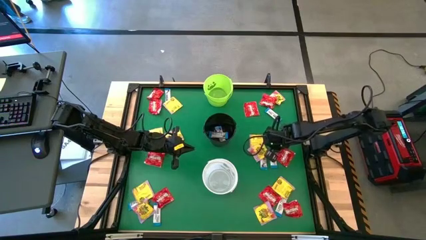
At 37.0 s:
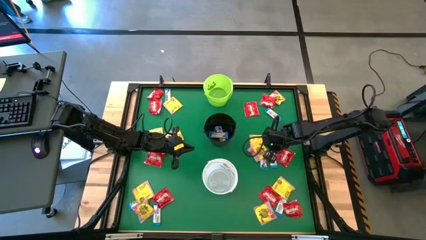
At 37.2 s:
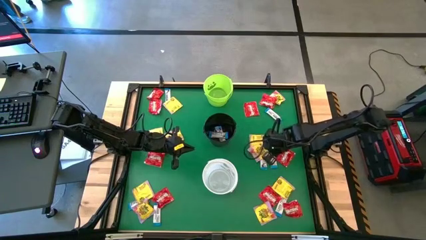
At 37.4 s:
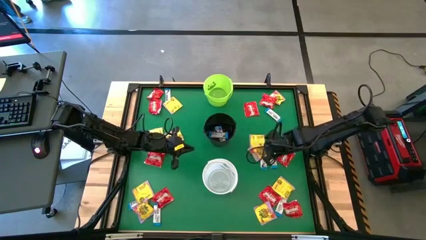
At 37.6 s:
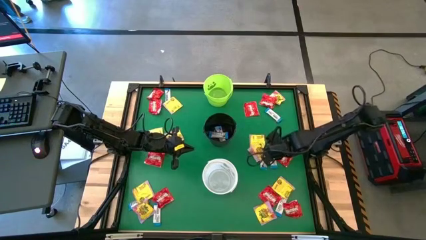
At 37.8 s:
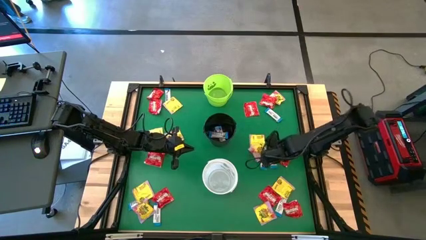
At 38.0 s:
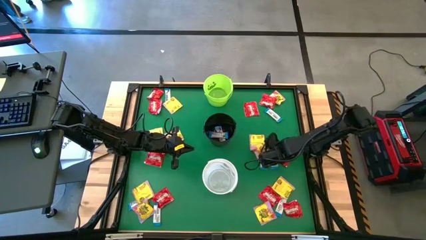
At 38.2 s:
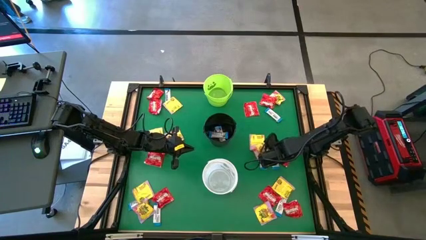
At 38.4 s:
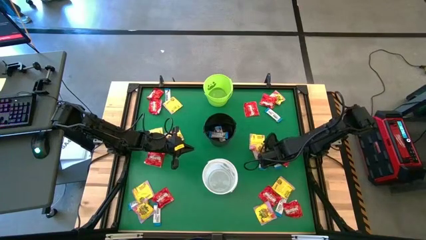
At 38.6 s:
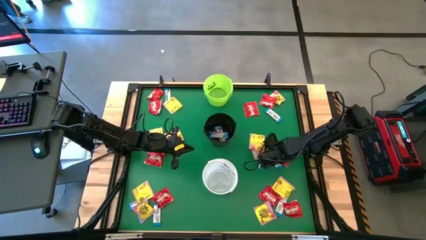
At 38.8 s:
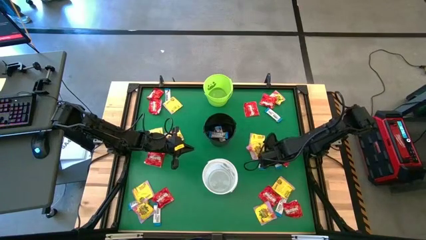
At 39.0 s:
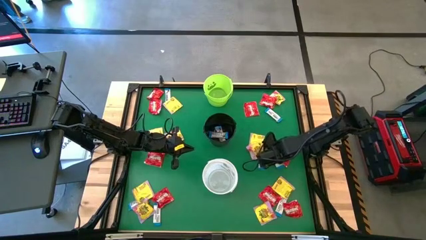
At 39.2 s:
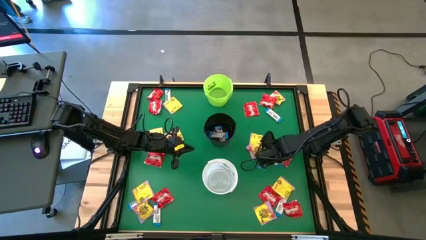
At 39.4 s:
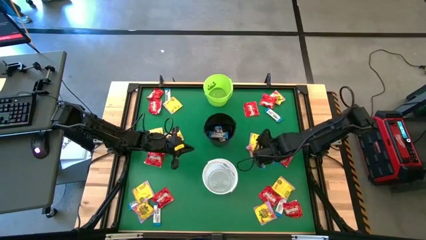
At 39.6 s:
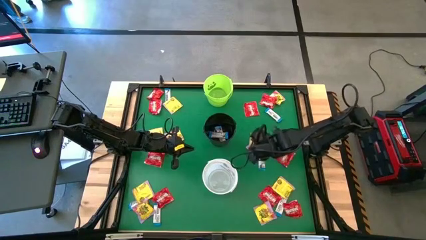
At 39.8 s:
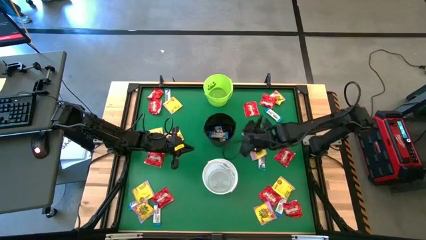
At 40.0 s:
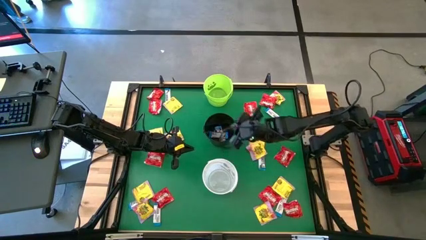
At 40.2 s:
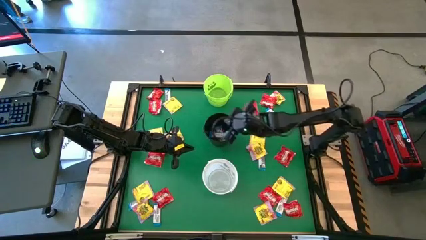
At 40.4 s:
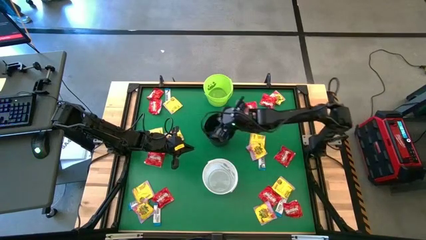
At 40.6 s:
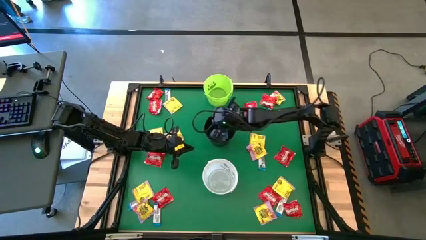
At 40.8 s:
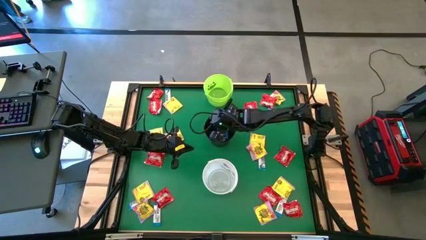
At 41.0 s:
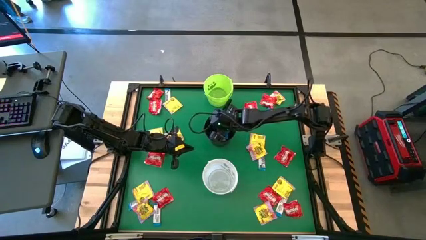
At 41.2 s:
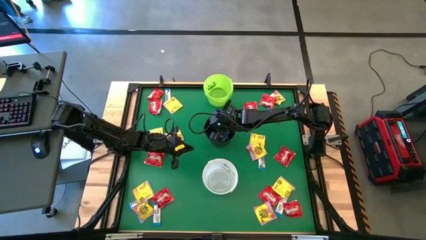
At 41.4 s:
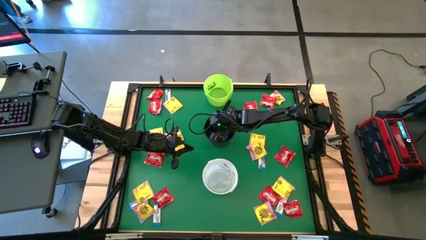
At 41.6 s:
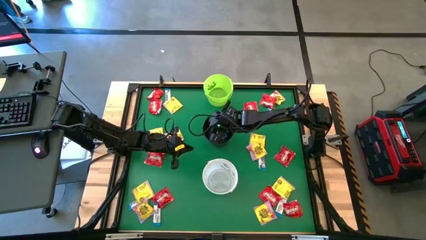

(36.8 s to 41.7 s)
Task: Sort candy by brand, put in halloween buckets
Put the white chocolate into the black bucket

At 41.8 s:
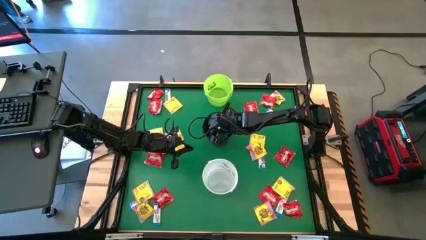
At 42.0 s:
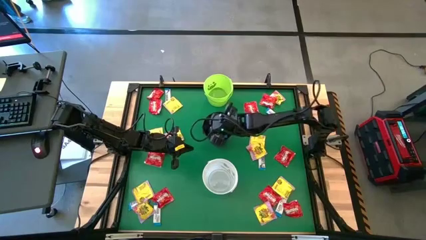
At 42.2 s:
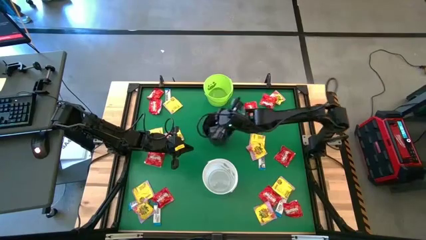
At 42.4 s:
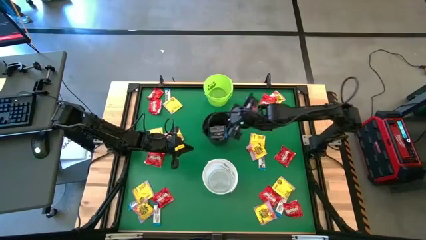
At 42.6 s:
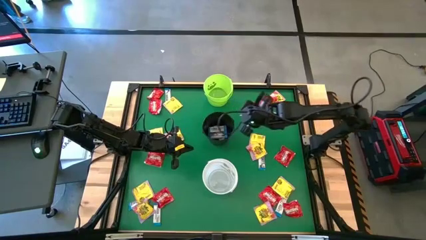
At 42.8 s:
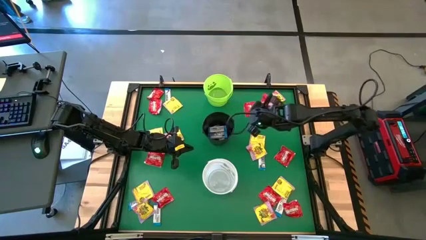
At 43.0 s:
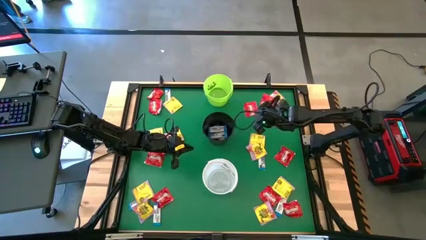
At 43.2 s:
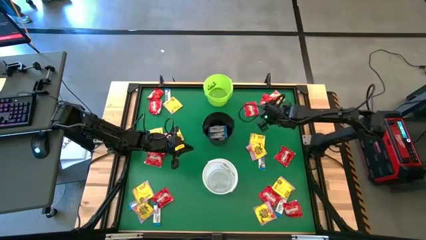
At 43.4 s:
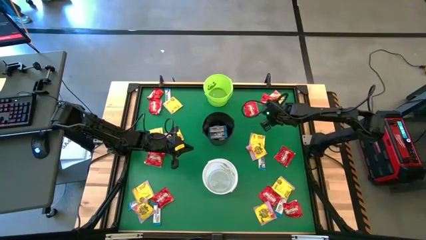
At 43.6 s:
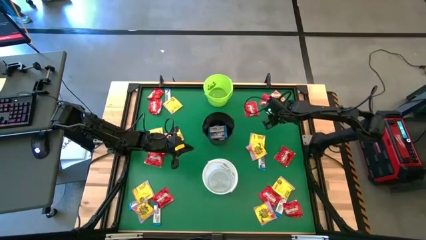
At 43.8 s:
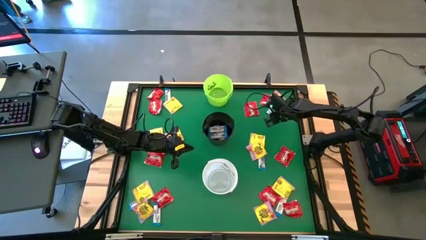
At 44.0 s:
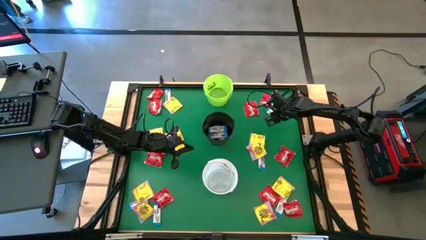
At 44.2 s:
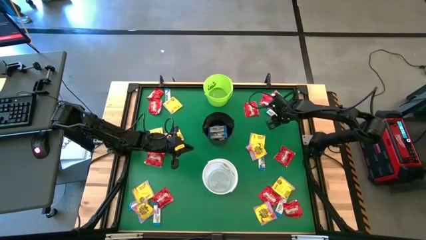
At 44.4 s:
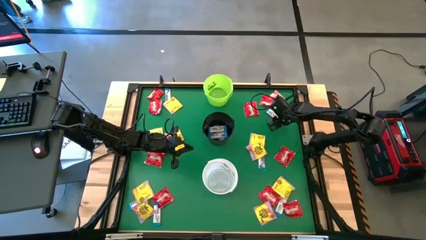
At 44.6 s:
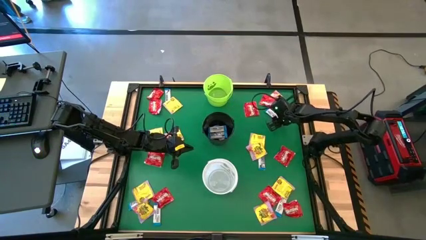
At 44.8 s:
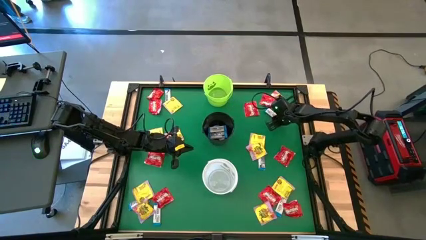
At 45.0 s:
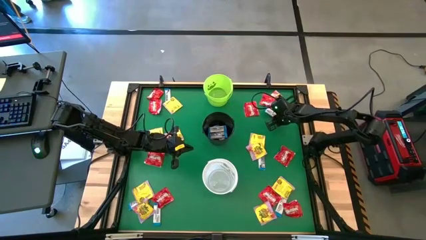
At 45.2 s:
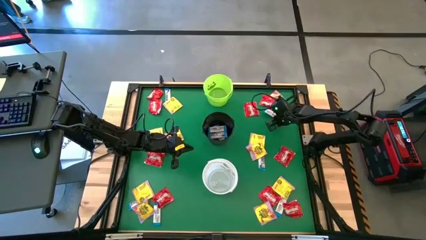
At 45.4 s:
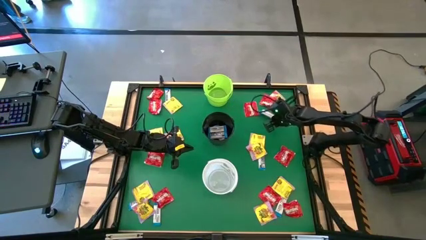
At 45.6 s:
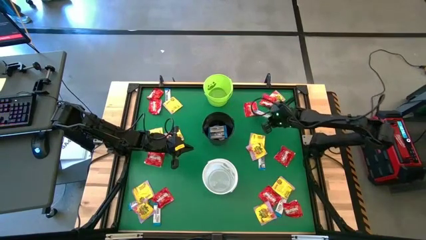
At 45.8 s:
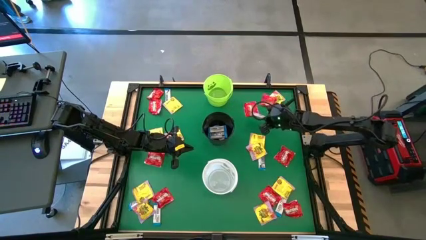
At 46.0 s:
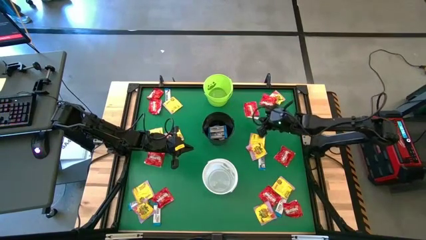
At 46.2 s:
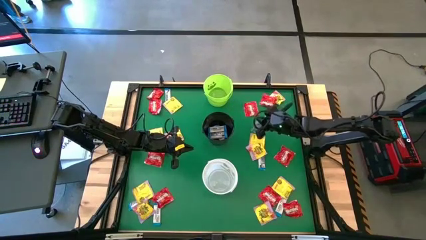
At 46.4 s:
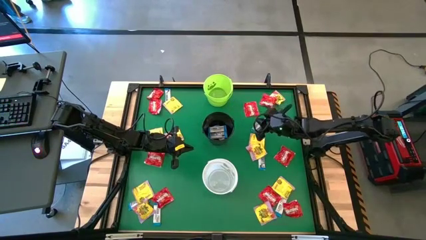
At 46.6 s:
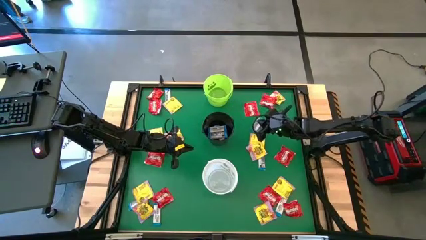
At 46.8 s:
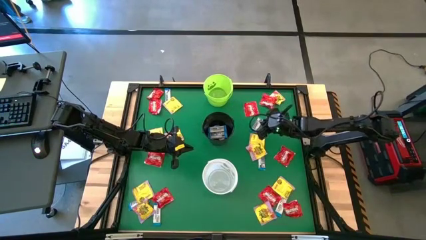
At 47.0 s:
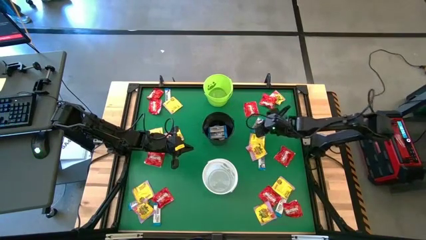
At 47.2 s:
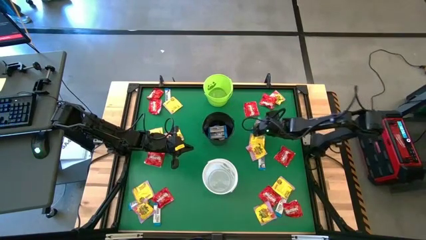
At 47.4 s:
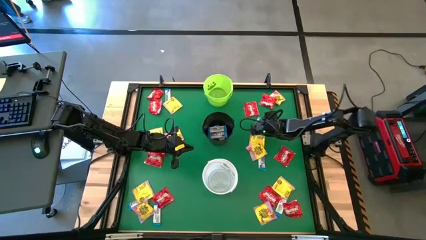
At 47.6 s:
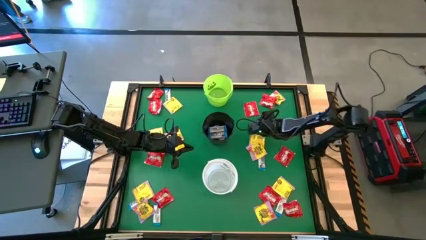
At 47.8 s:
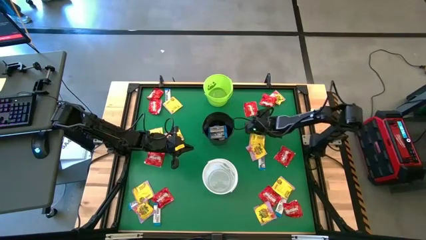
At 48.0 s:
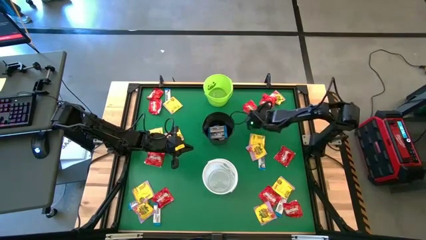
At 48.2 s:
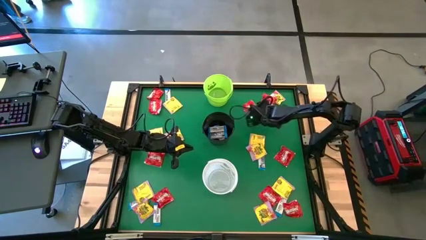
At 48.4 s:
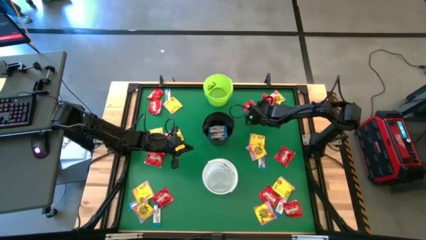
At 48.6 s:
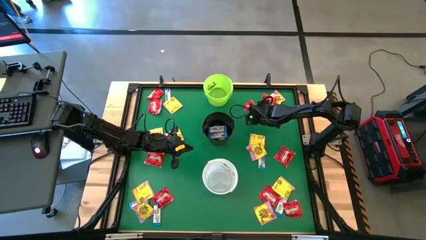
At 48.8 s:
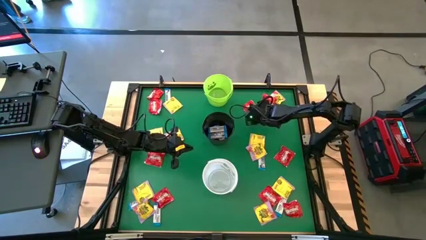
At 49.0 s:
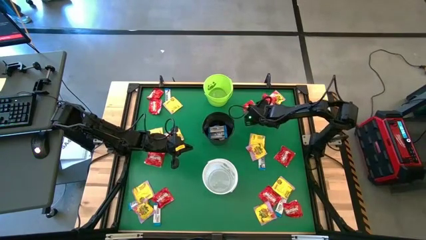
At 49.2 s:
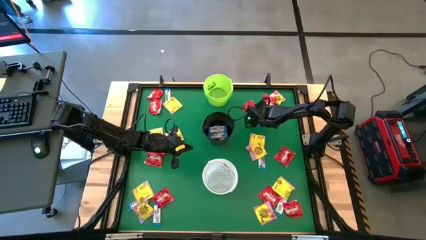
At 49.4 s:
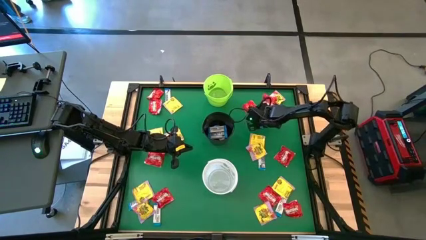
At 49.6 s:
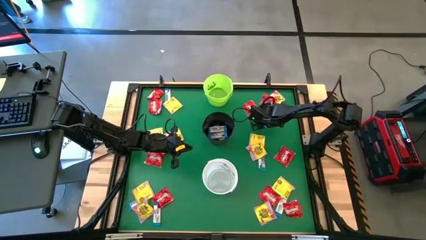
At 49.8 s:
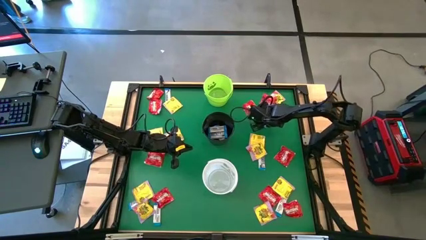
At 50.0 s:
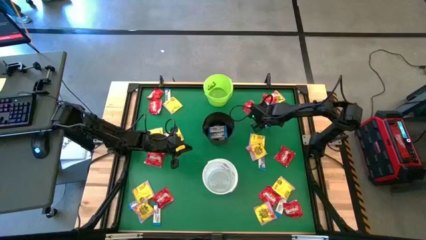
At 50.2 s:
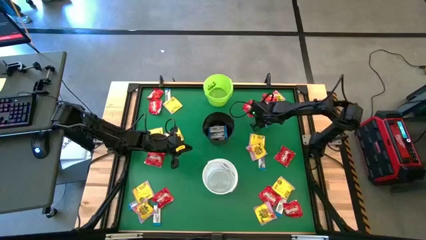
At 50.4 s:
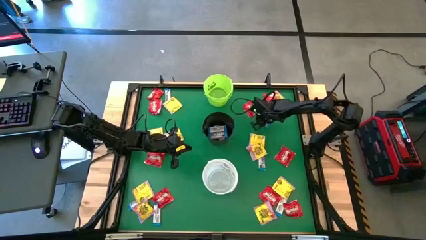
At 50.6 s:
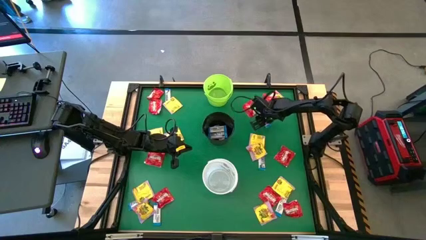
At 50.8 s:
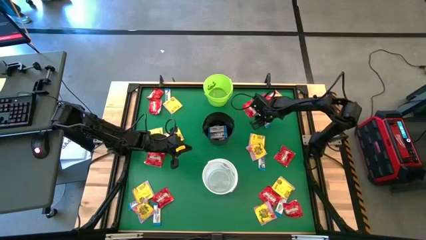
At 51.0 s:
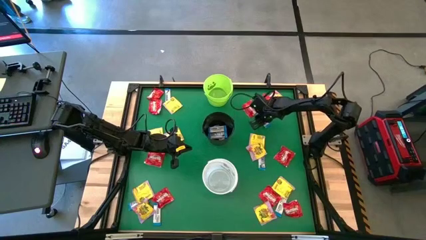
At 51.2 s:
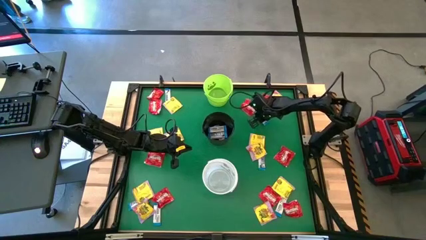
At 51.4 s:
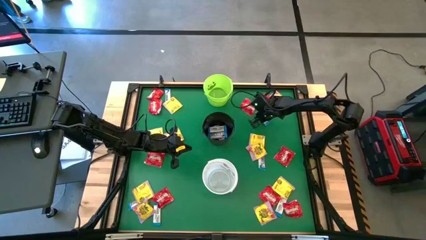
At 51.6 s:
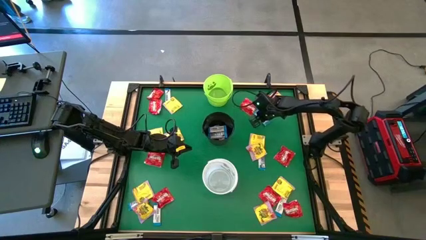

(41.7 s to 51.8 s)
Put the white chocolate into the black bucket

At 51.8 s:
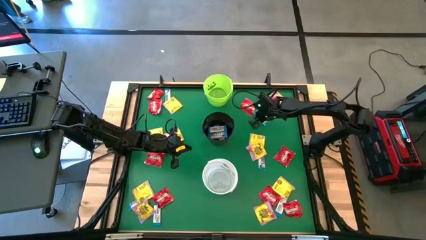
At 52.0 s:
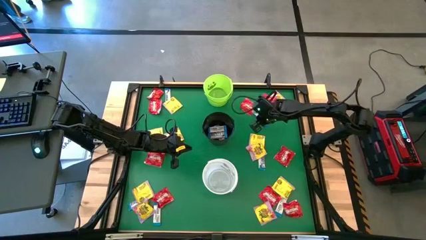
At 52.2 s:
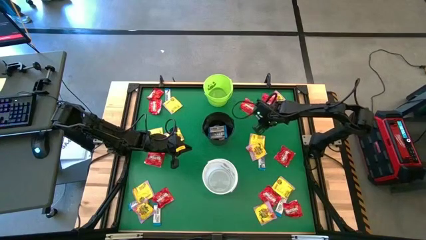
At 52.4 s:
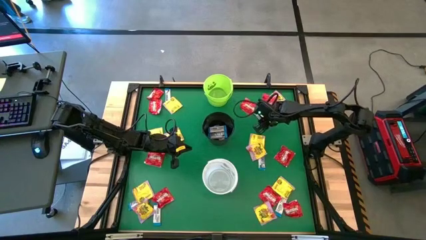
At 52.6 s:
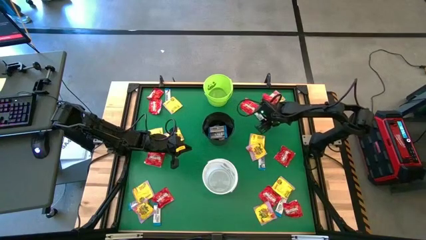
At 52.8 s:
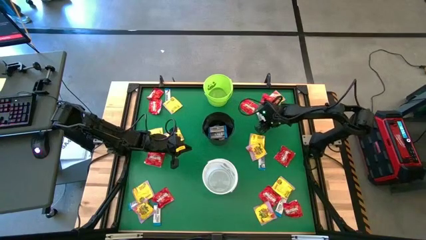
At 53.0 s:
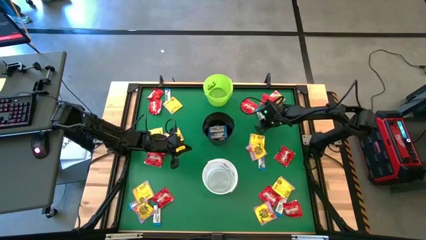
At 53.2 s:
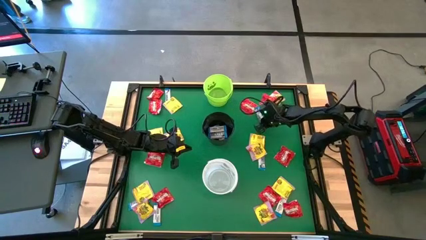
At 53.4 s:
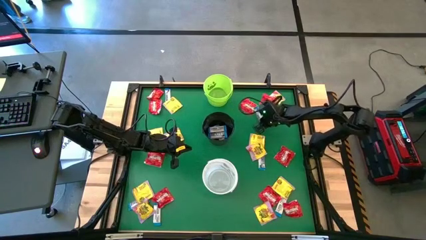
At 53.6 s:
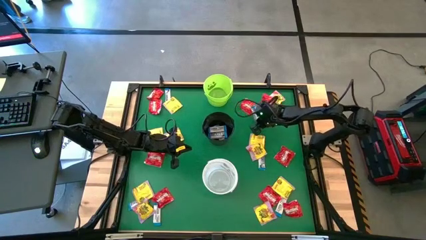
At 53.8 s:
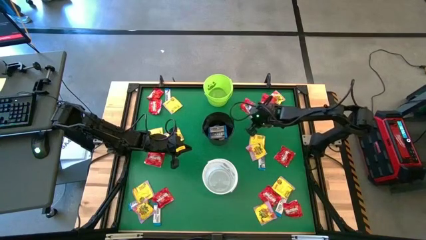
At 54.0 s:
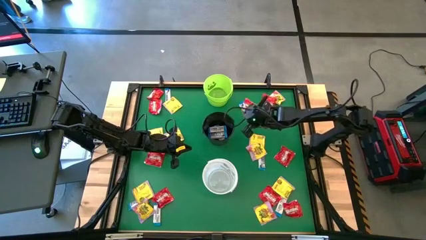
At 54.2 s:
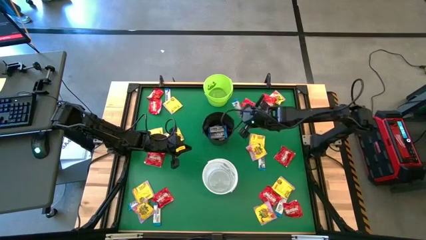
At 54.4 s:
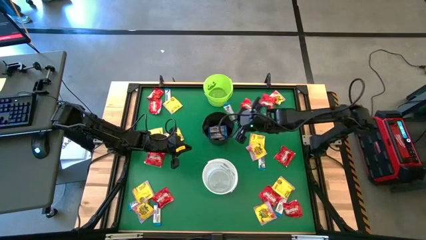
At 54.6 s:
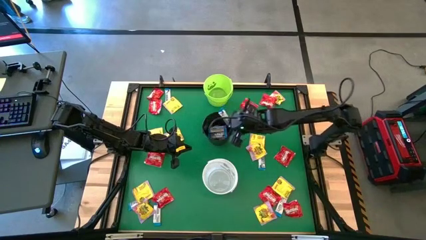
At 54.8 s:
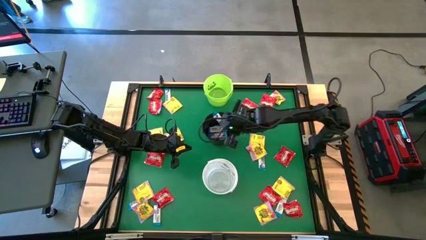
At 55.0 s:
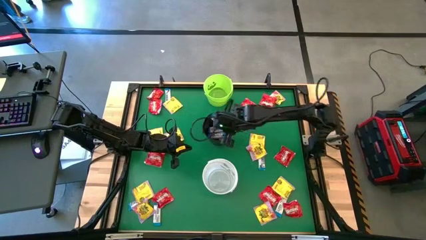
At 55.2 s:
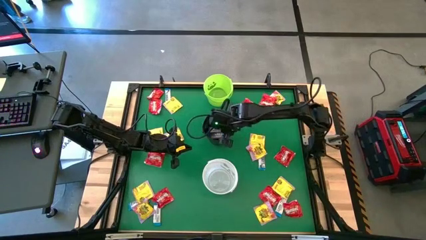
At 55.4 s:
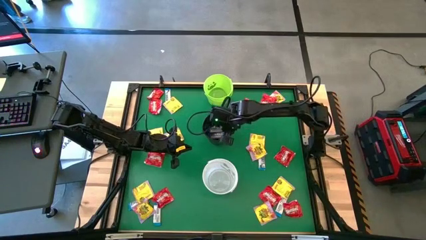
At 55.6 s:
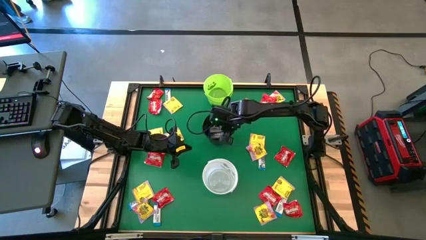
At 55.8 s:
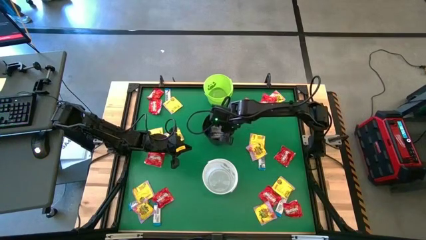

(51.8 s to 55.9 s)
Put the white chocolate into the black bucket
